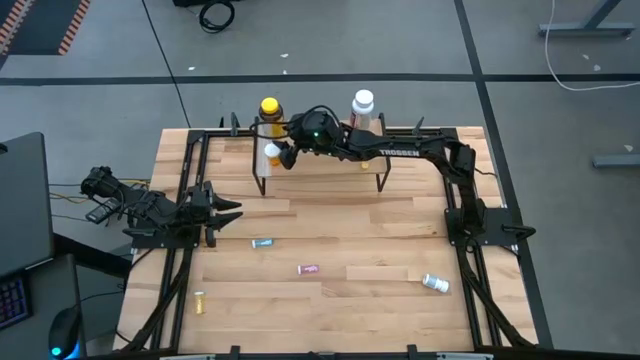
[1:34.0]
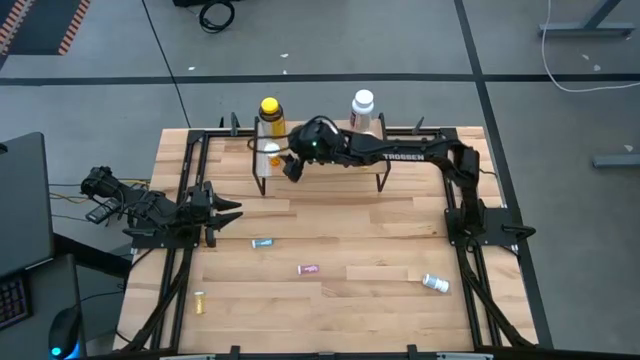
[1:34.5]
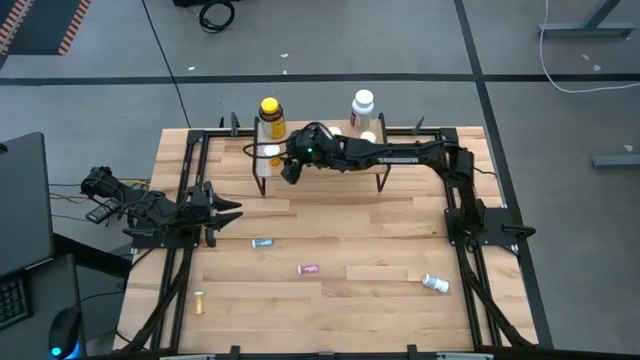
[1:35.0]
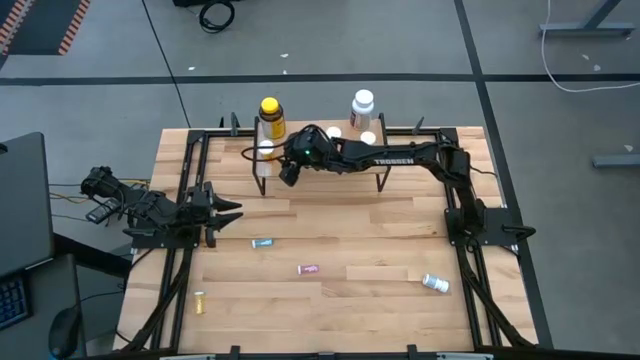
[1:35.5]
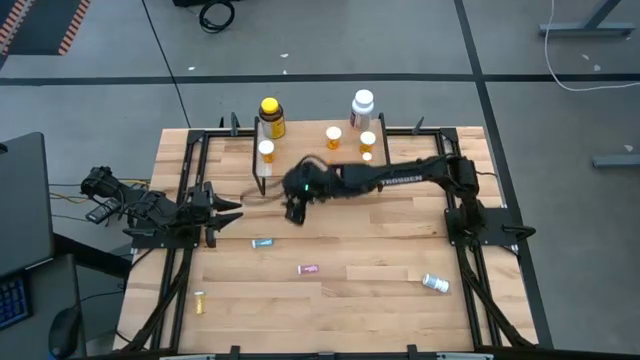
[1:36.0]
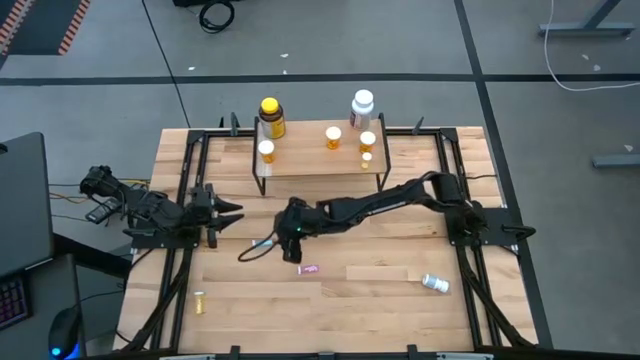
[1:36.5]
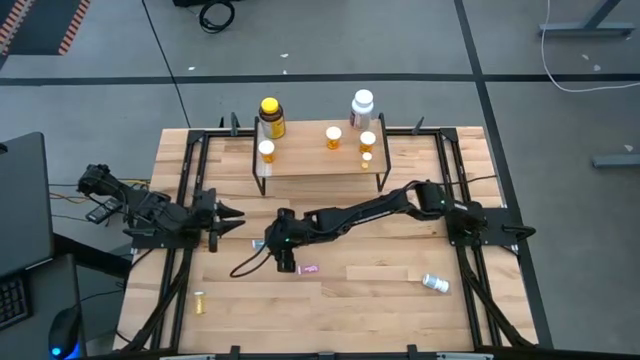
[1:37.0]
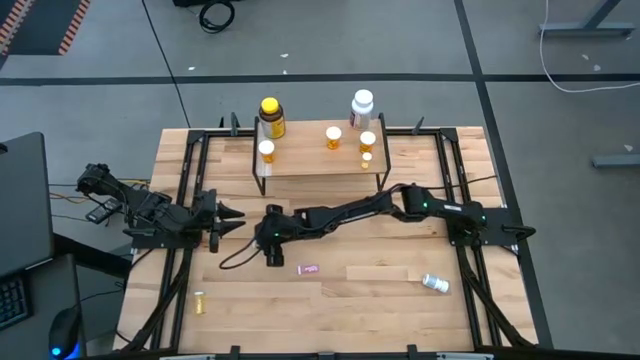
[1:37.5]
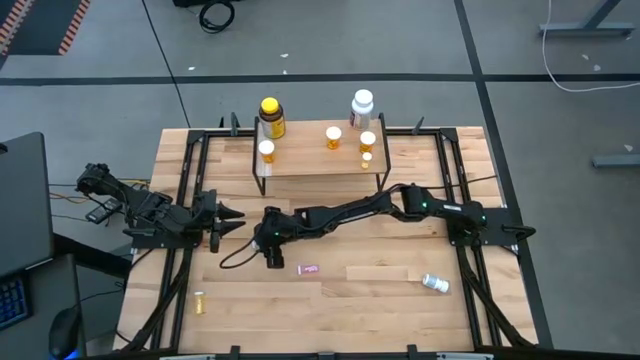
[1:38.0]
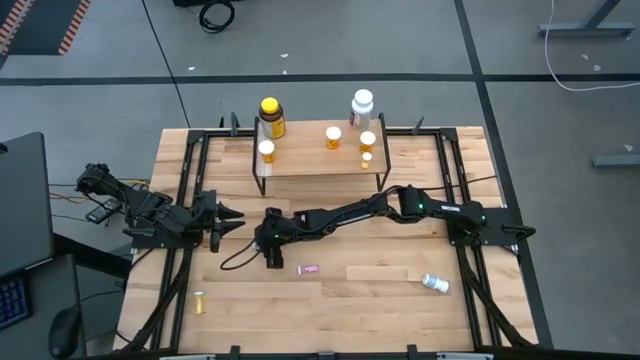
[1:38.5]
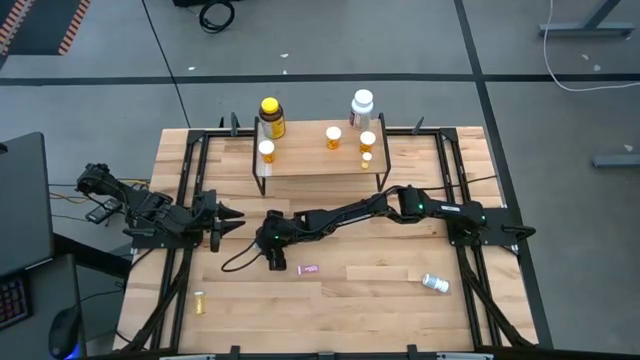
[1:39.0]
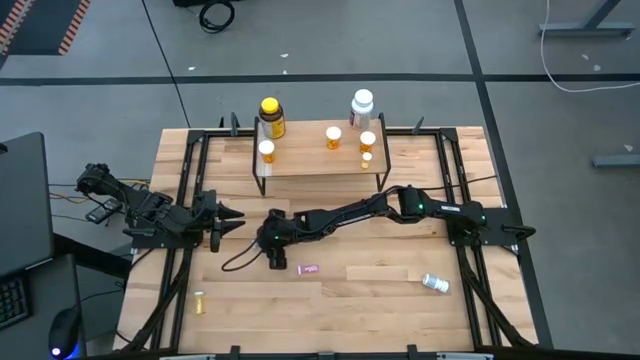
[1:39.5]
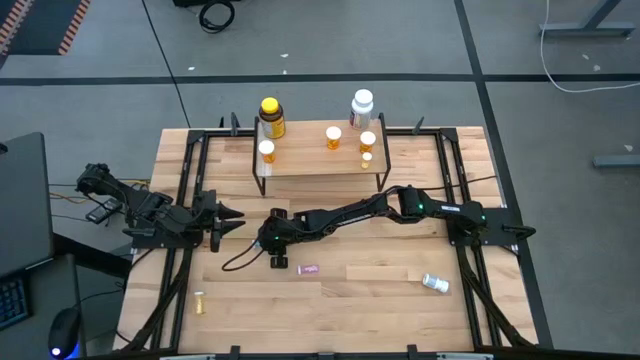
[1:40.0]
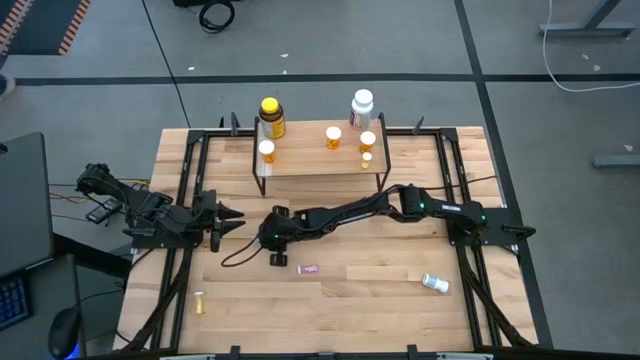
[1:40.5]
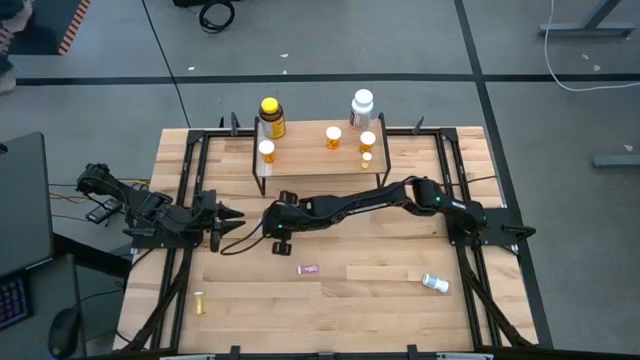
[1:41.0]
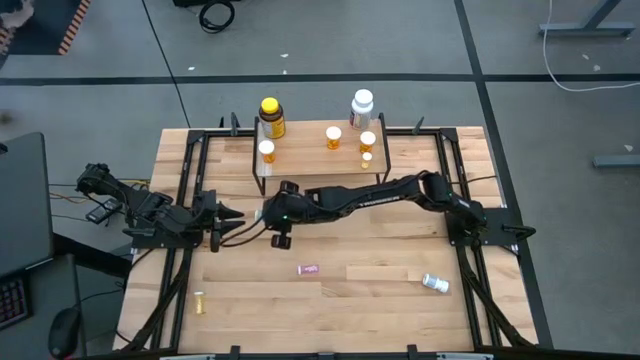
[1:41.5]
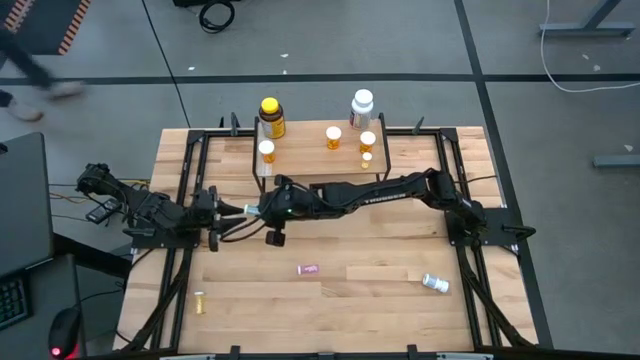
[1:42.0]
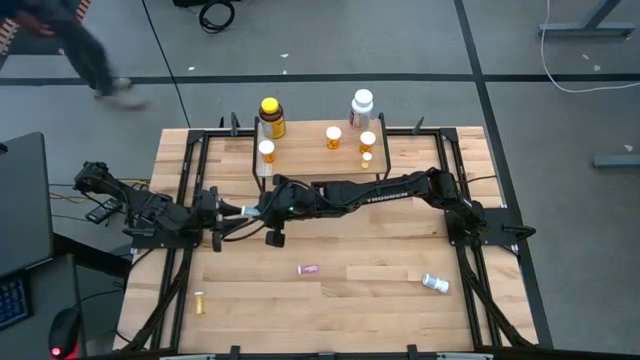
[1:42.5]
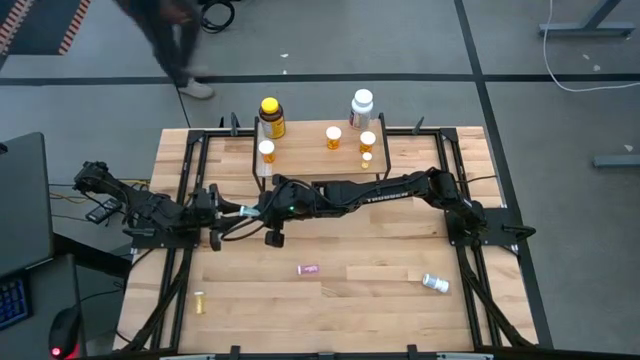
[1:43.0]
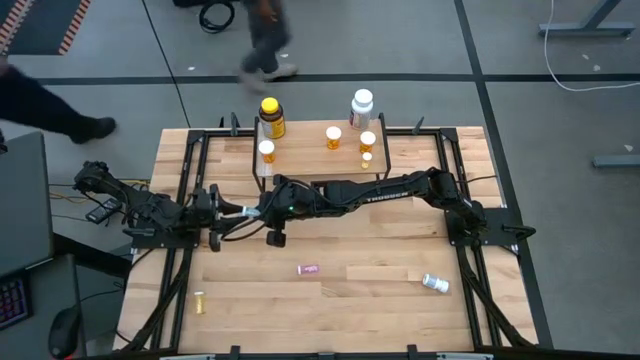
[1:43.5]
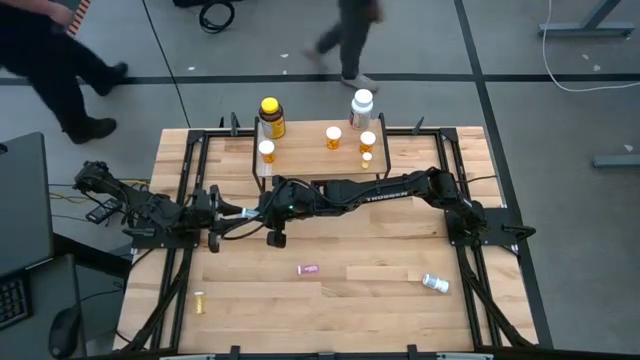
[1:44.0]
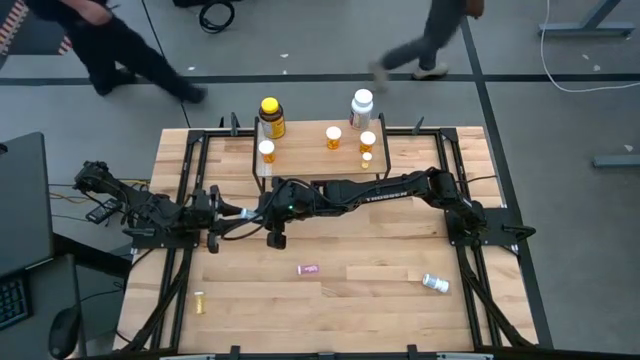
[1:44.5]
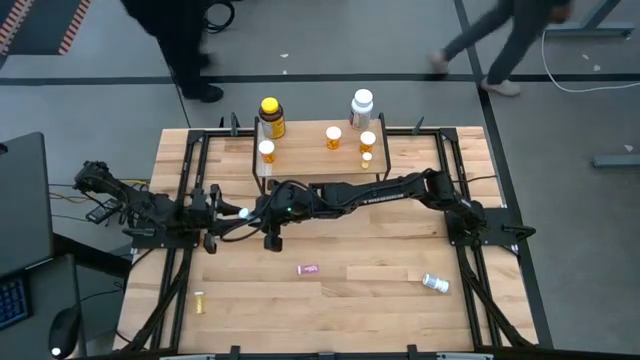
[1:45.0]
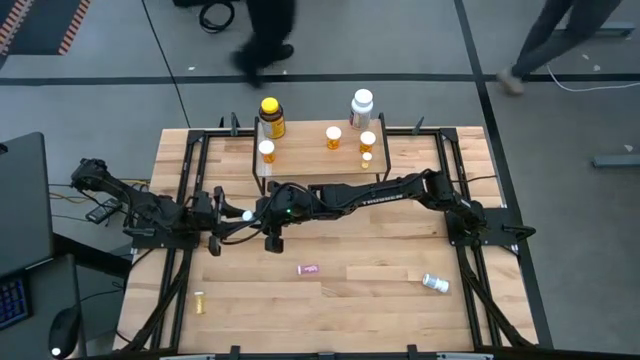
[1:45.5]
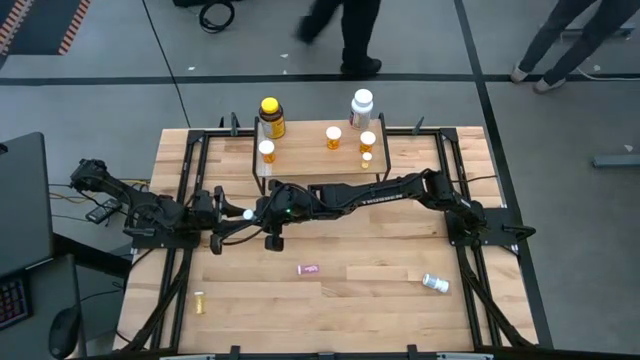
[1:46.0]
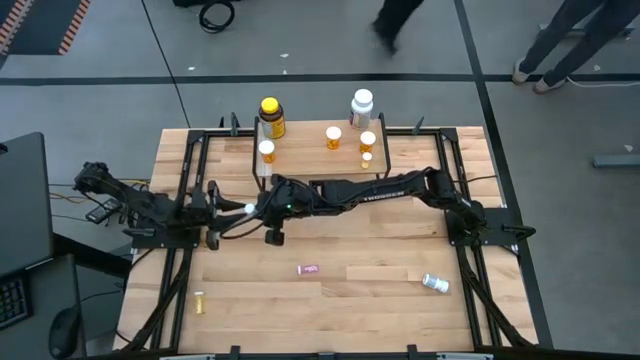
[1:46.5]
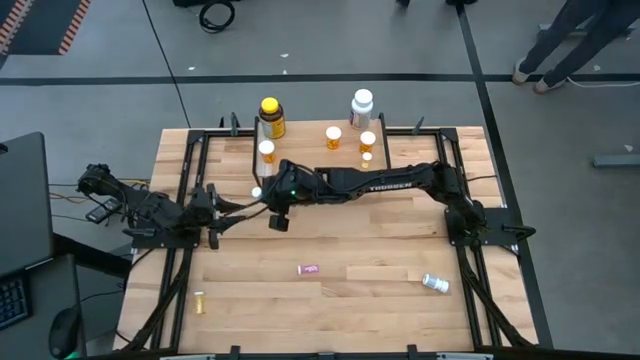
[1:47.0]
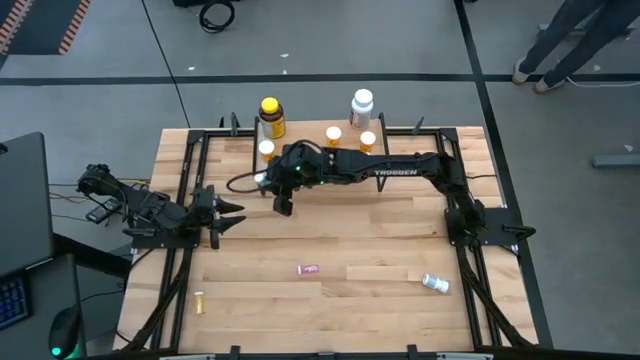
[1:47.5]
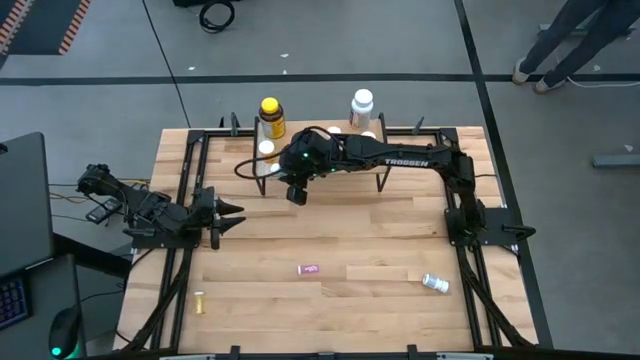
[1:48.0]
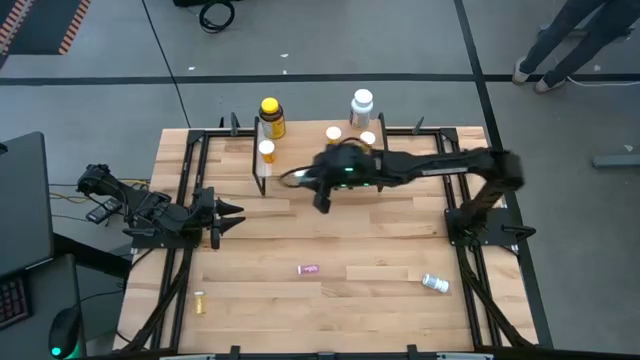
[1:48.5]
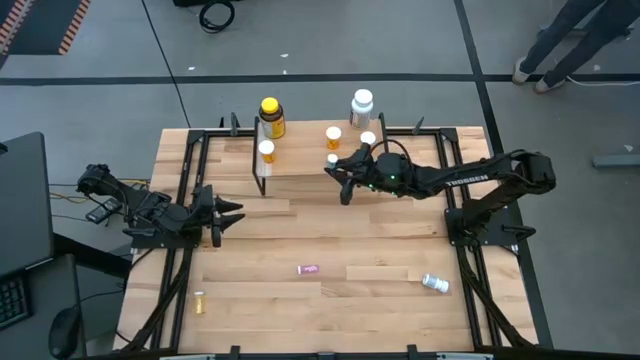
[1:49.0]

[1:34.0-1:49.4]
Task: Pick and place medicine bottles onto shelf by color
Put the blue pill bottle on the shelf

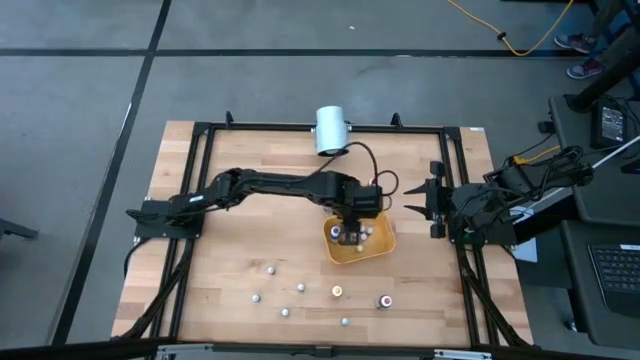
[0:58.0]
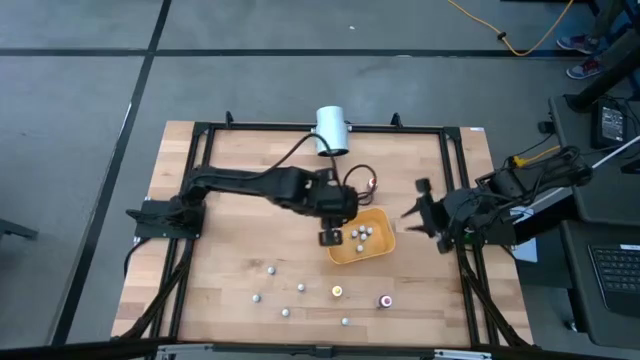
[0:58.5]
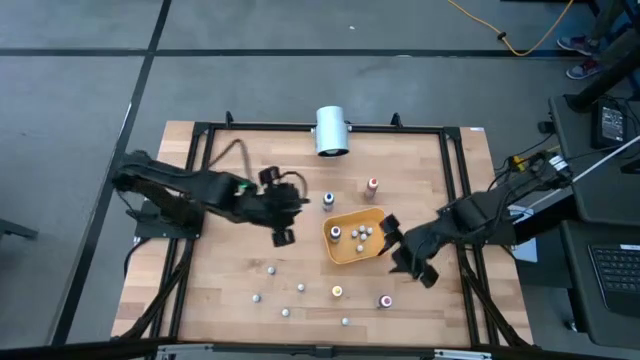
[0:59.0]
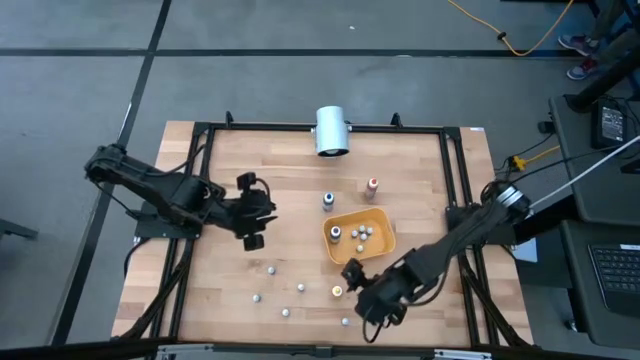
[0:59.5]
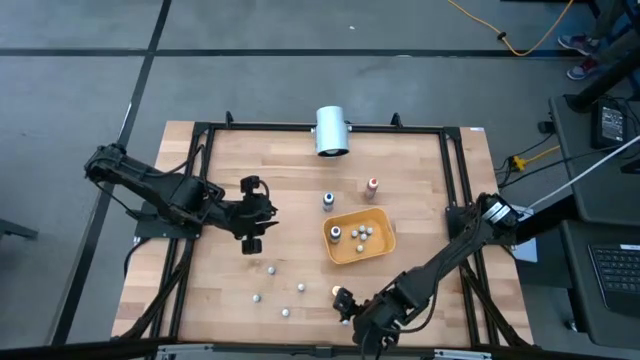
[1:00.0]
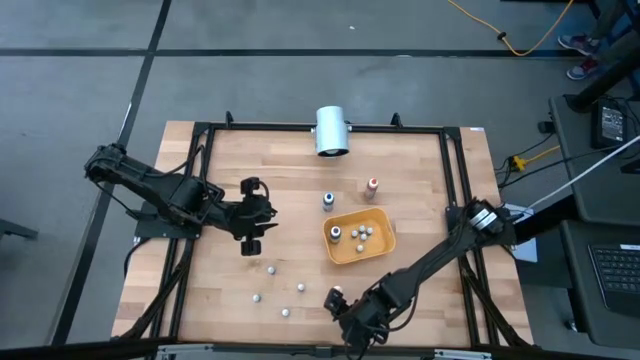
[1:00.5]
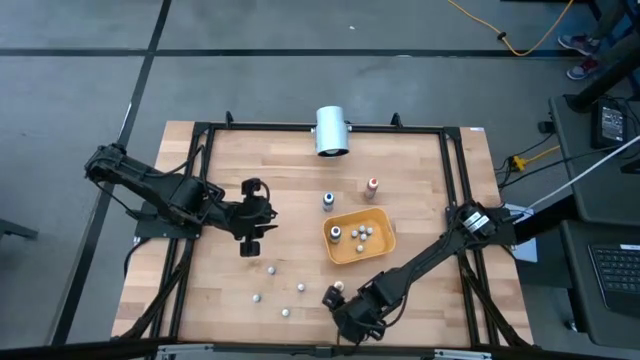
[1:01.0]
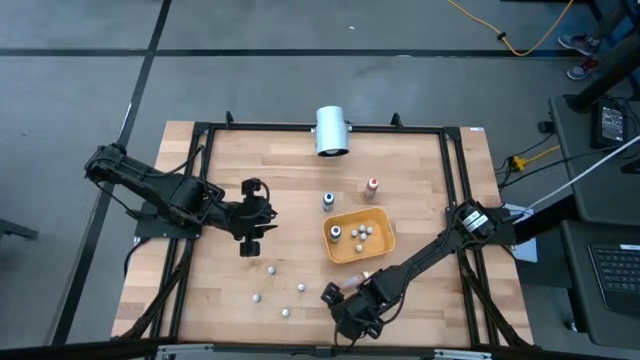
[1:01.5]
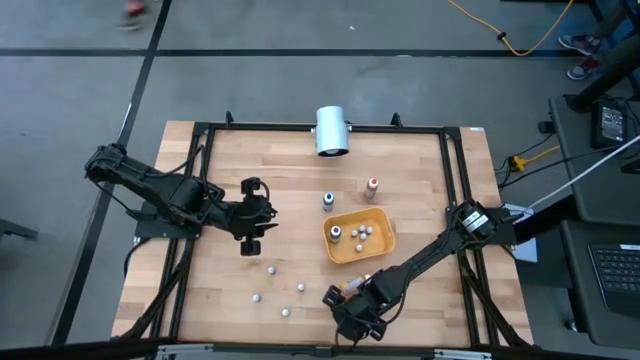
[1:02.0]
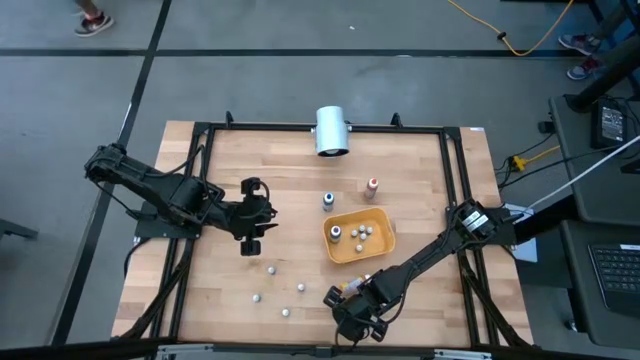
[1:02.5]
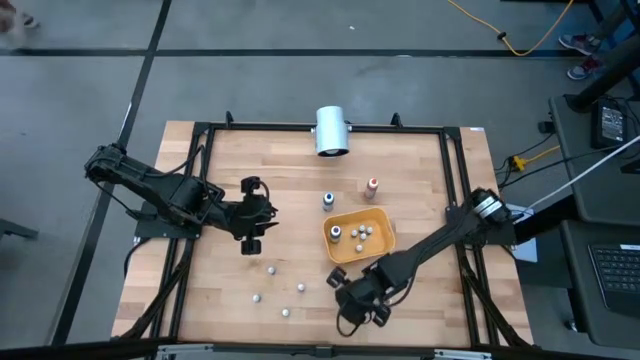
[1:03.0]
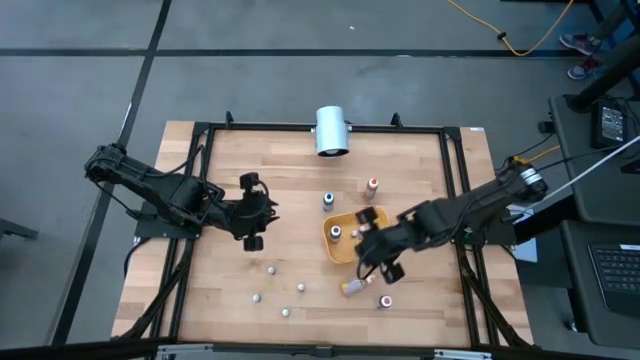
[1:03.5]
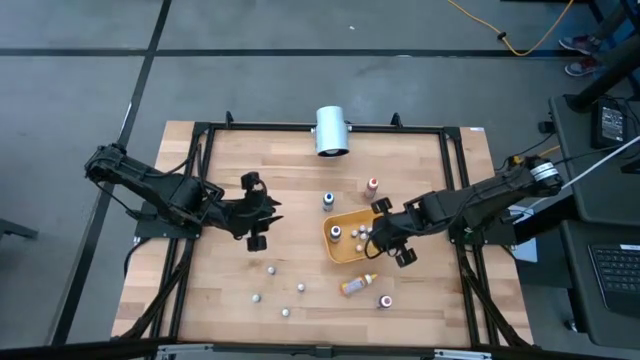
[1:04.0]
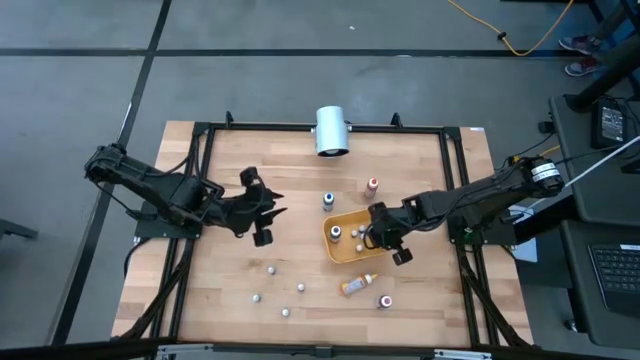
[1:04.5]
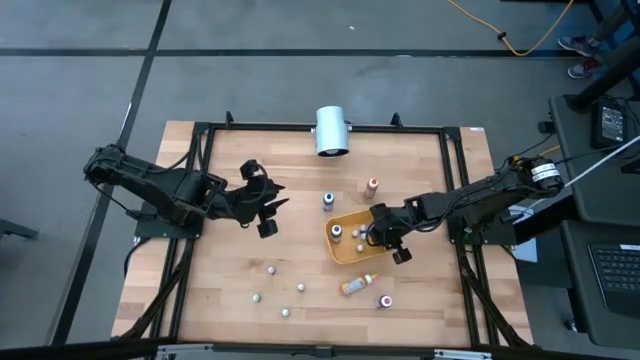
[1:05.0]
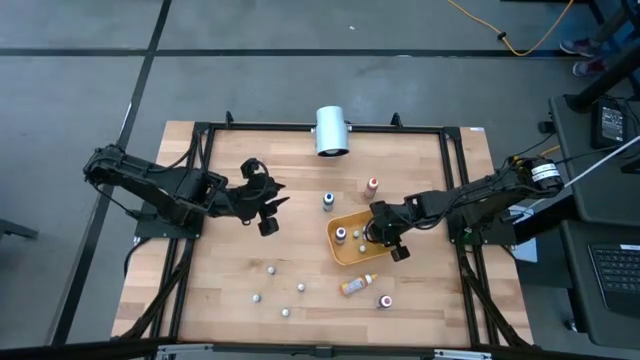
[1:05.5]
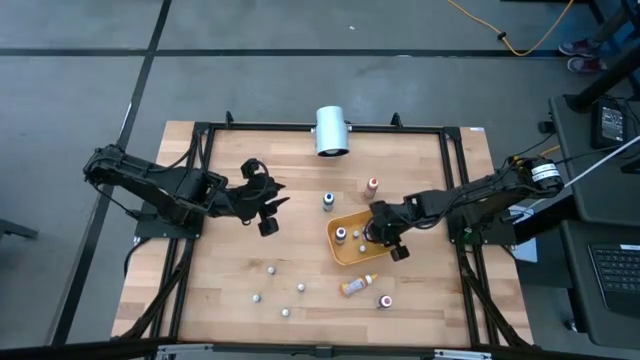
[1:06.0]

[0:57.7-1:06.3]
Task: Pick & Place food coloring
Put the small pink food coloring bottle into the yellow bin
